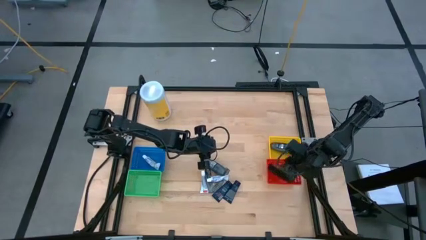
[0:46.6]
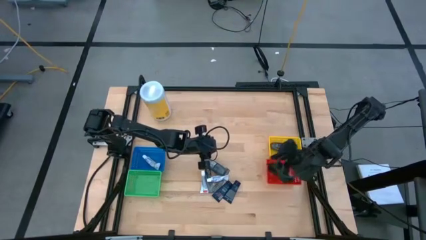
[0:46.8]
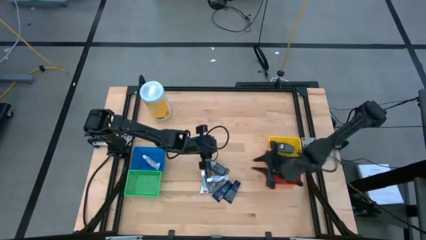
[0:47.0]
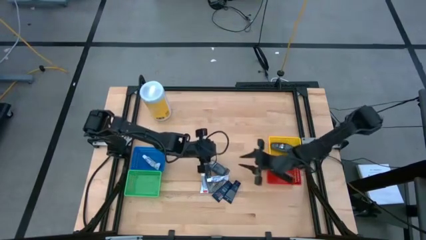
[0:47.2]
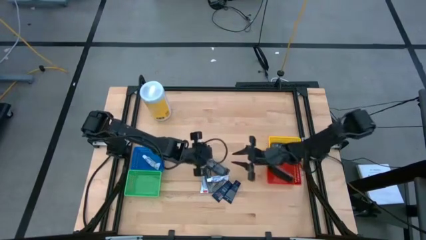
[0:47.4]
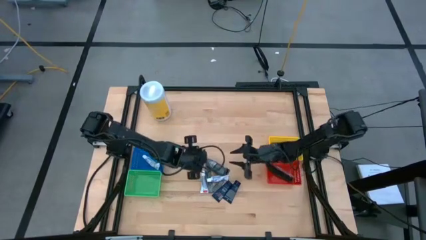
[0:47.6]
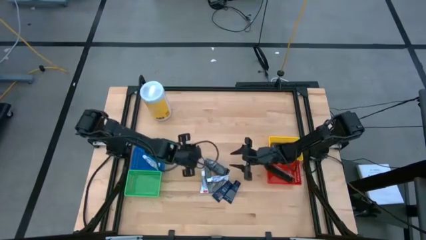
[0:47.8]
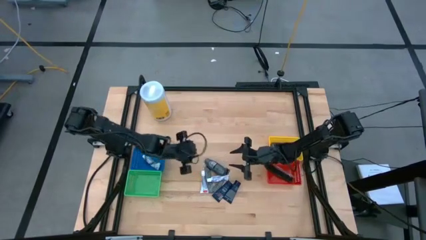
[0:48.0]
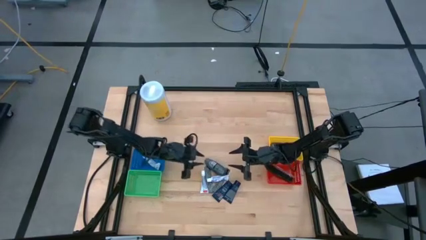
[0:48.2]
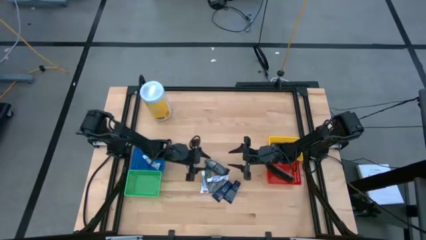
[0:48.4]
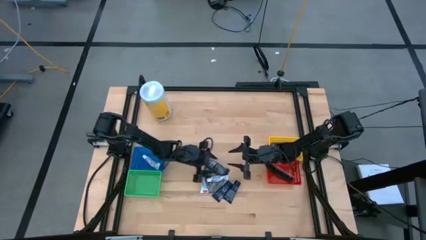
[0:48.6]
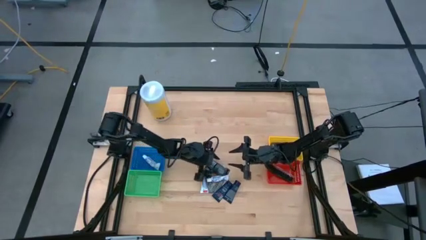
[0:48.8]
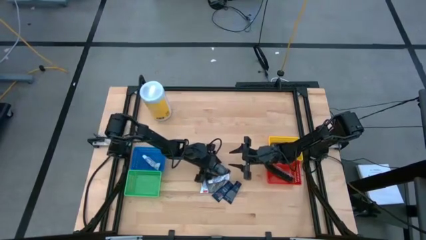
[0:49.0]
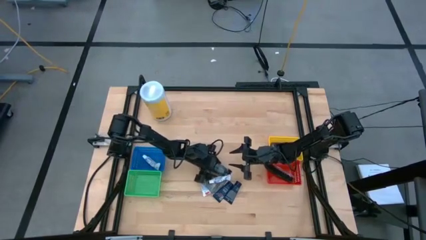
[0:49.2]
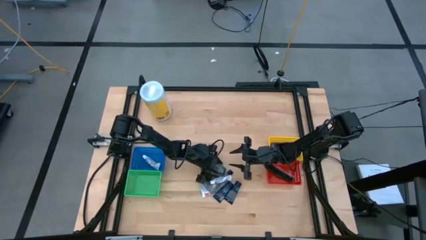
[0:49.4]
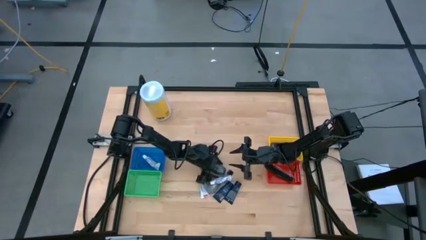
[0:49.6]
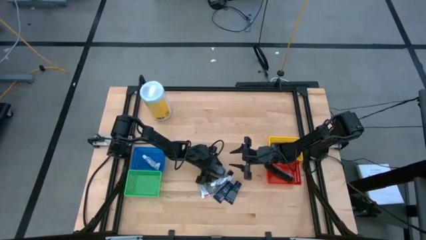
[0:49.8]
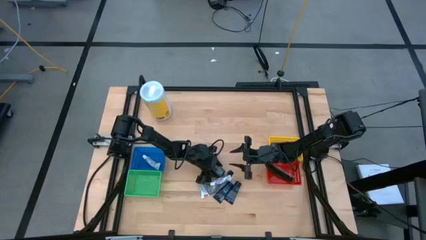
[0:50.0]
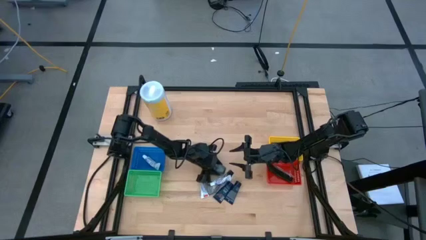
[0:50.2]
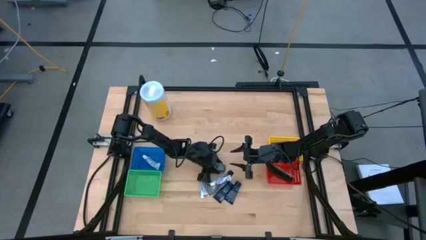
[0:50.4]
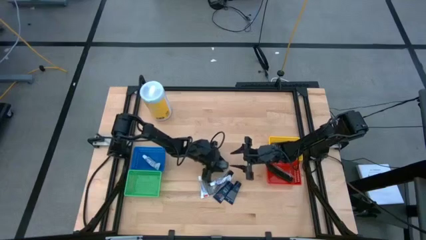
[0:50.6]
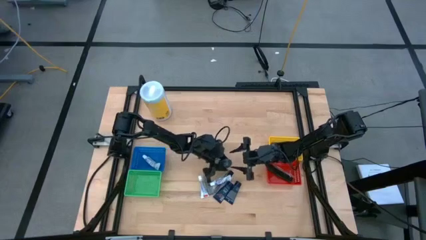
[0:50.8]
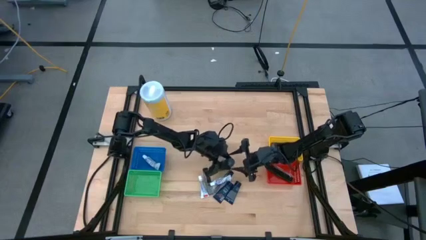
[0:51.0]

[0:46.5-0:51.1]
Task: Pick & Place Travel size toiletries
Put the black deodorant into the yellow basket

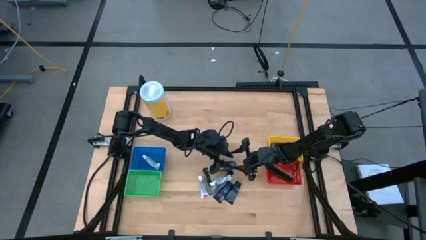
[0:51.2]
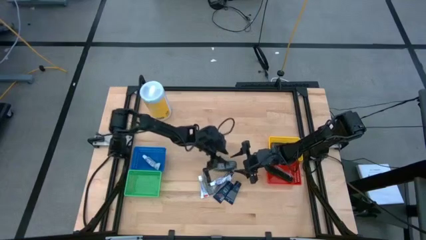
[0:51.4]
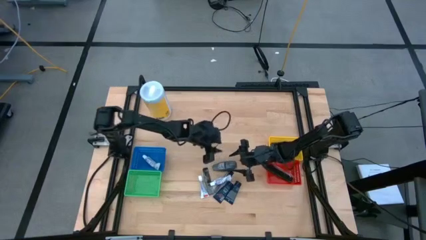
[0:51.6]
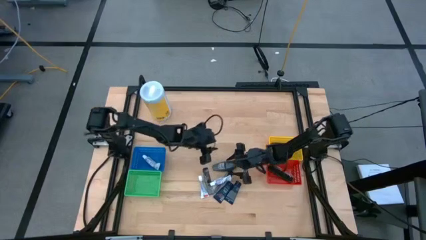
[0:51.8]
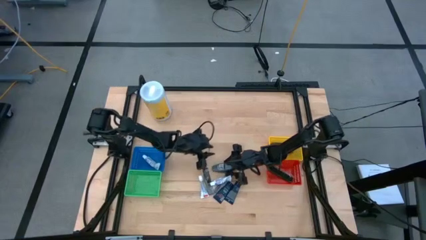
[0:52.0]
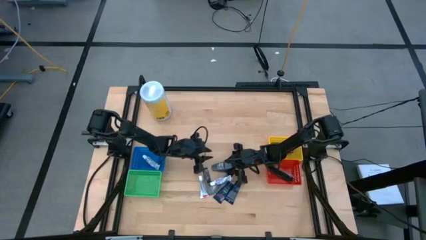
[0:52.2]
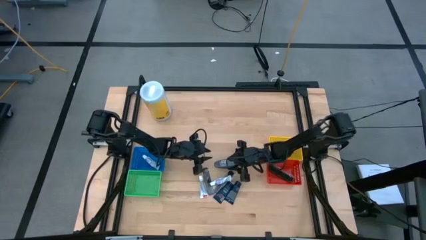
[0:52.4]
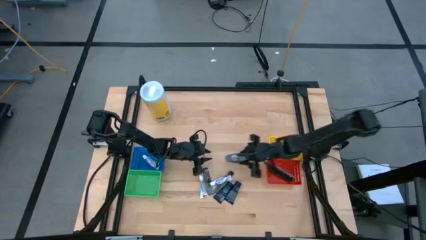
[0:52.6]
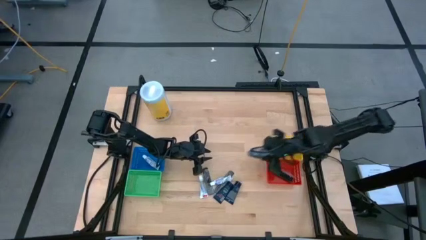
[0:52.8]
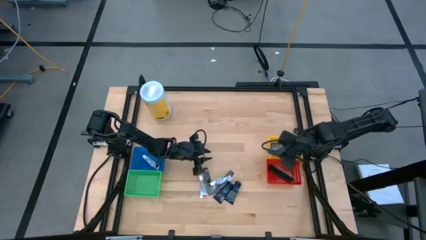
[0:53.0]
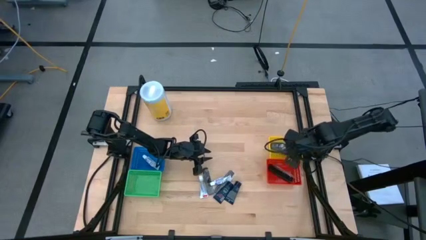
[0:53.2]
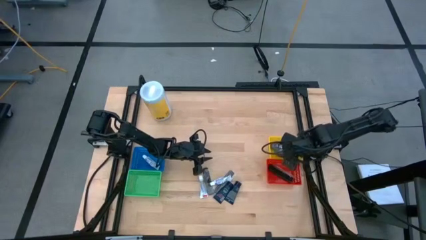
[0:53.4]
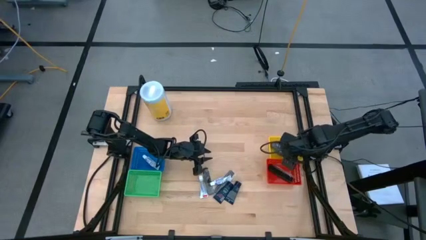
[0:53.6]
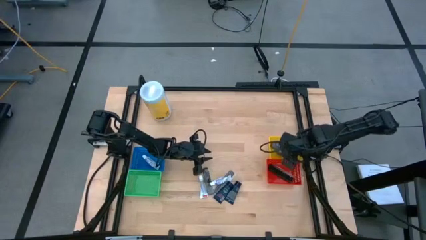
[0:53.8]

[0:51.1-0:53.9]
Put the black deodorant into the yellow basket

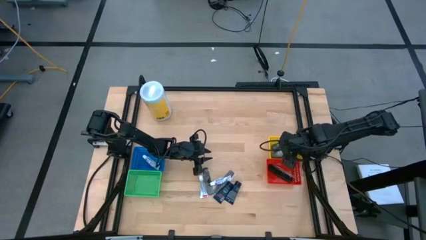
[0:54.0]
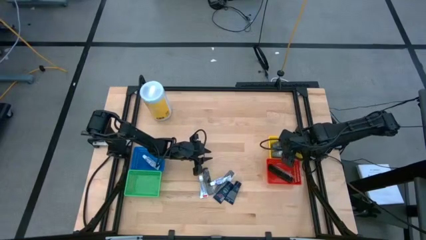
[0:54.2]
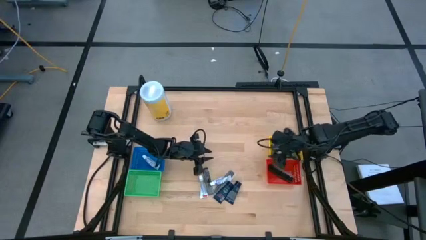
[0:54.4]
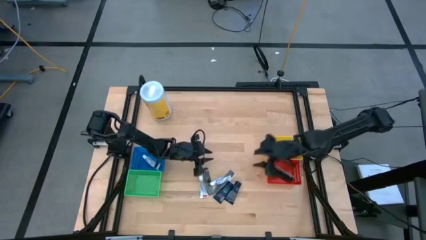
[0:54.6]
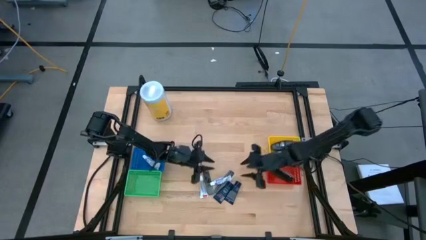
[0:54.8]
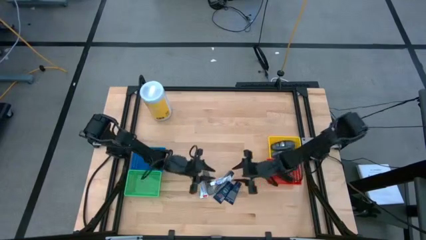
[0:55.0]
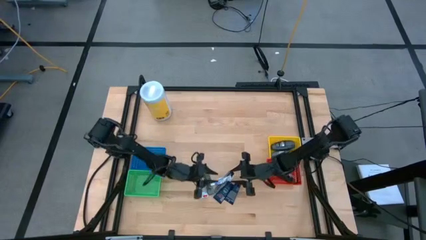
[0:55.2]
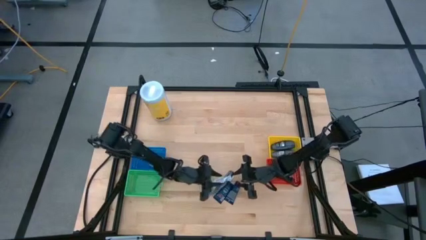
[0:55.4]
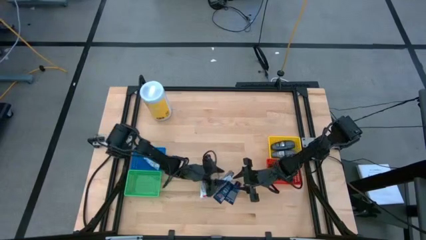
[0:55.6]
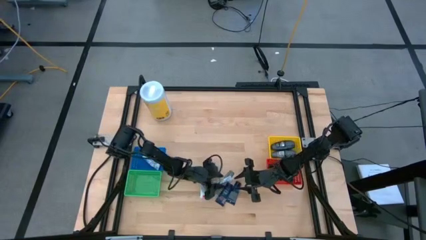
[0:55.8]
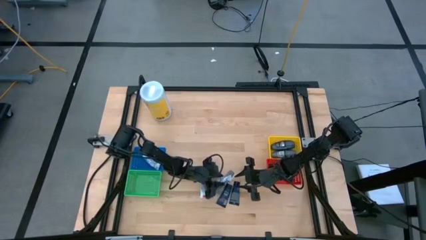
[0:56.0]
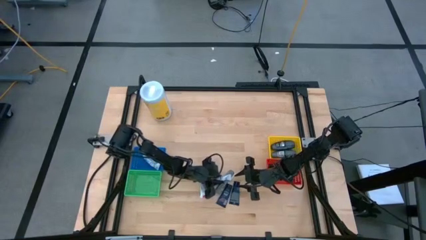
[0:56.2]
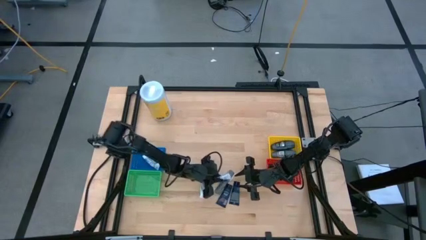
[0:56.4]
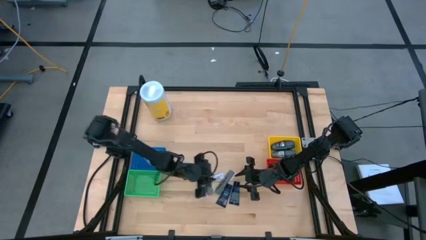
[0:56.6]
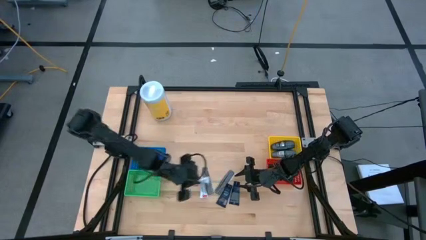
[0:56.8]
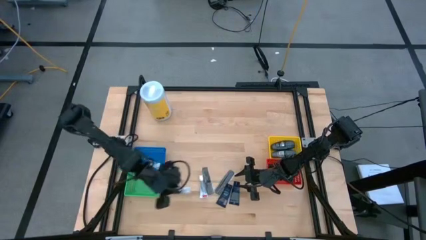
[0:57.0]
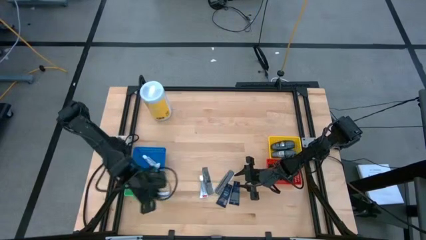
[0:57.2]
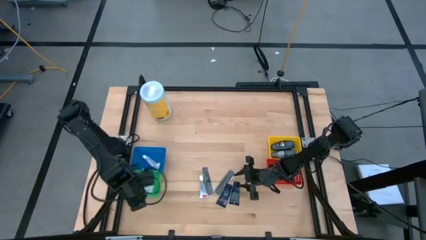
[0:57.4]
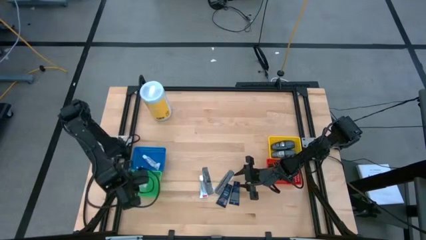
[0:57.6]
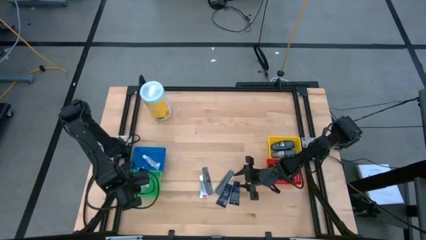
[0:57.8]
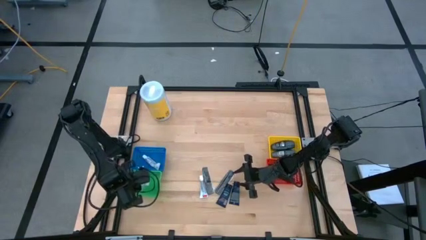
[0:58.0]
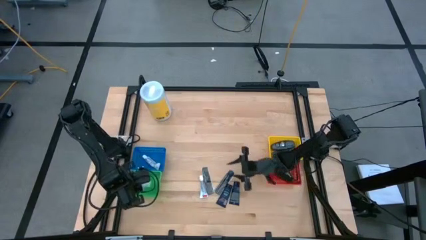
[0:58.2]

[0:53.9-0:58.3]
Put the white toothpaste into the green basket

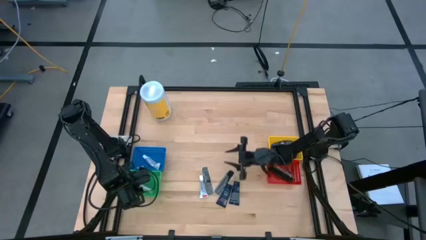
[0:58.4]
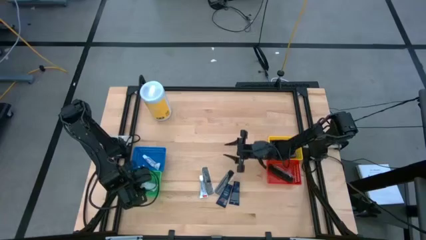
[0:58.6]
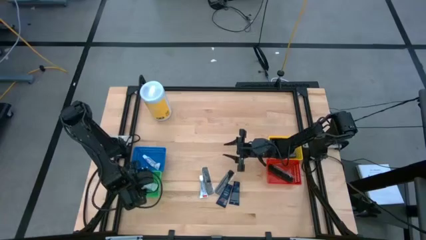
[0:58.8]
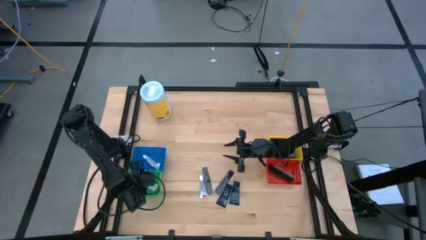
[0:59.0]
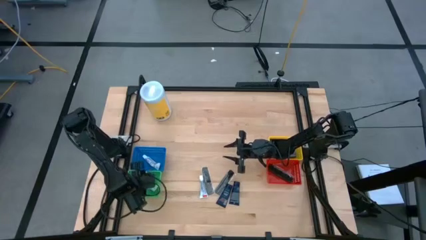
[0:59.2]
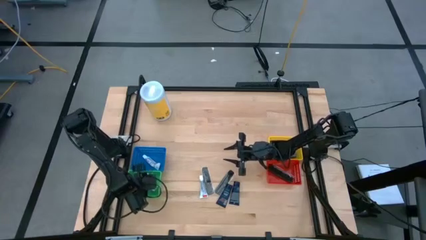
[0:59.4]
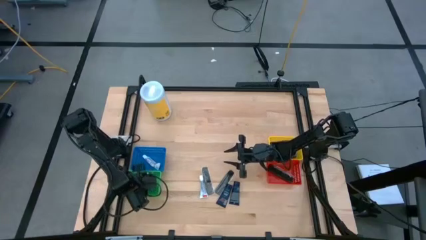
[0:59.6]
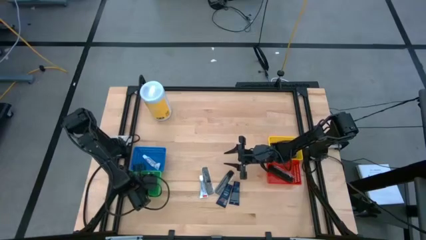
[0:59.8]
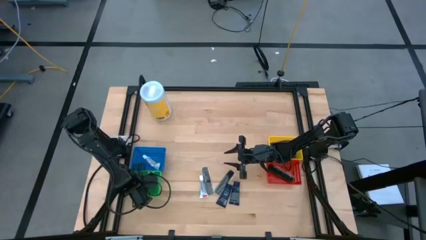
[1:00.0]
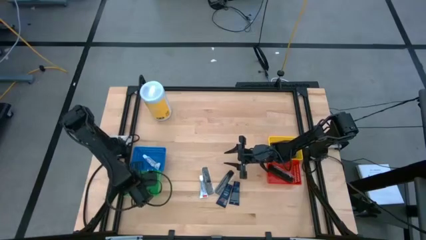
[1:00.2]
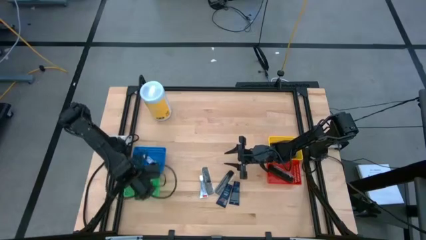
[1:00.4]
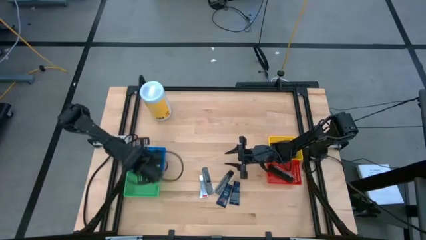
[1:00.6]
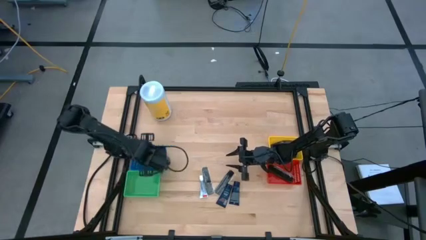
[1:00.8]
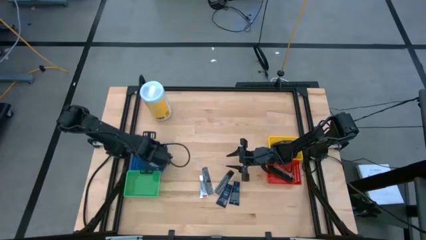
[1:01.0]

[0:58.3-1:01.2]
Put the white toothpaste into the blue basket

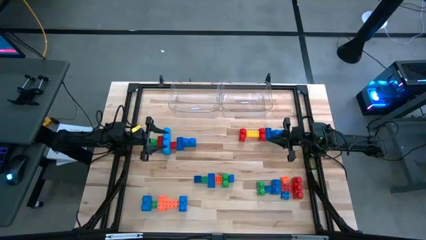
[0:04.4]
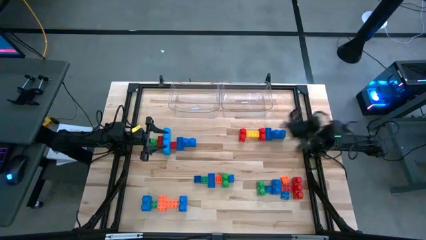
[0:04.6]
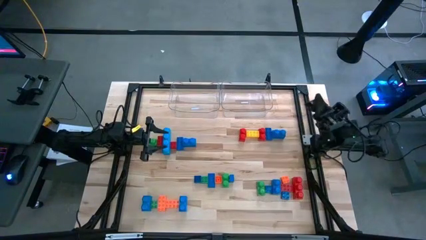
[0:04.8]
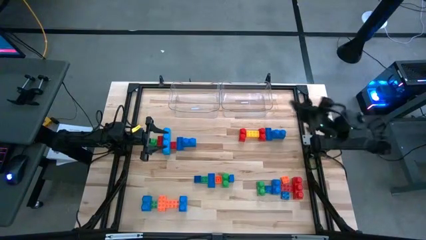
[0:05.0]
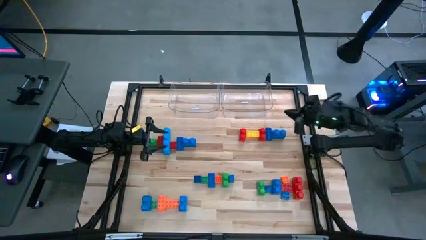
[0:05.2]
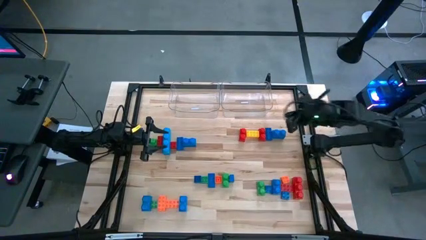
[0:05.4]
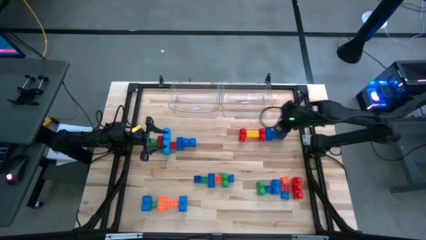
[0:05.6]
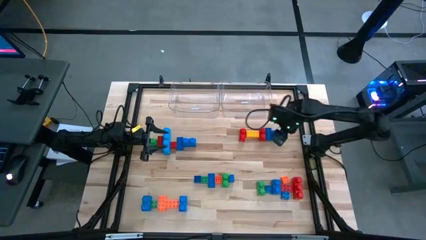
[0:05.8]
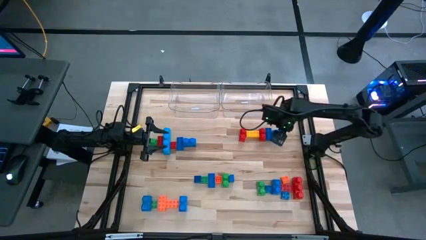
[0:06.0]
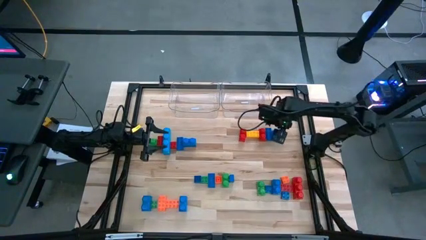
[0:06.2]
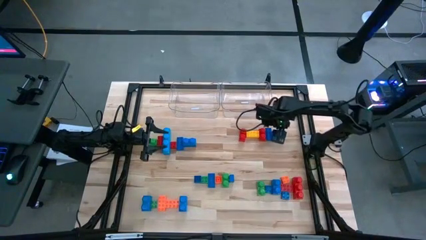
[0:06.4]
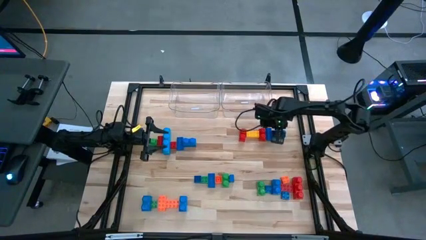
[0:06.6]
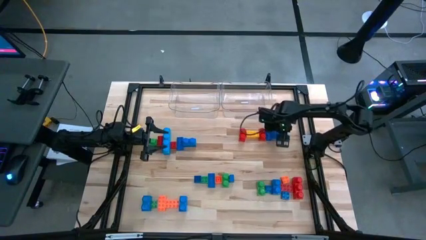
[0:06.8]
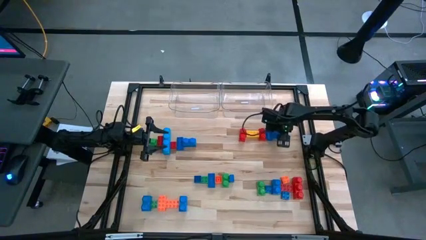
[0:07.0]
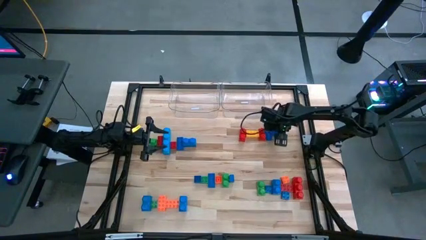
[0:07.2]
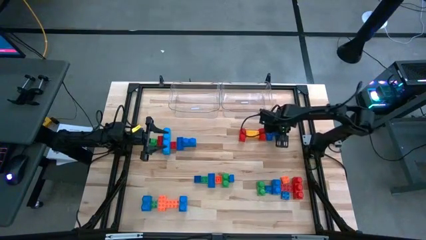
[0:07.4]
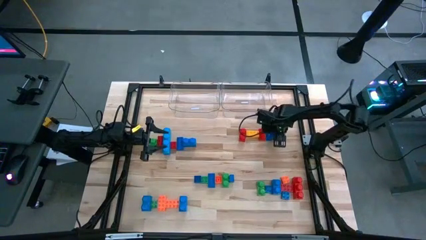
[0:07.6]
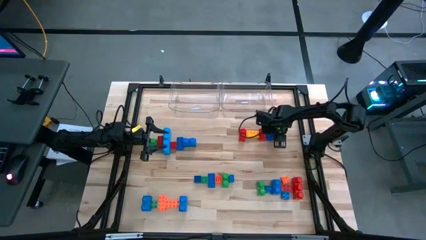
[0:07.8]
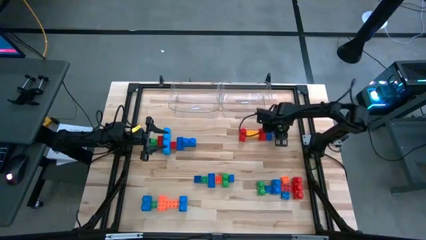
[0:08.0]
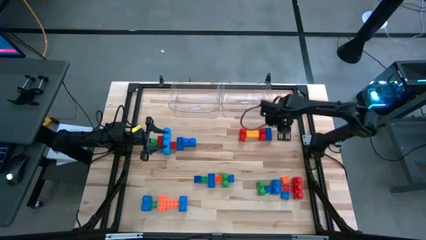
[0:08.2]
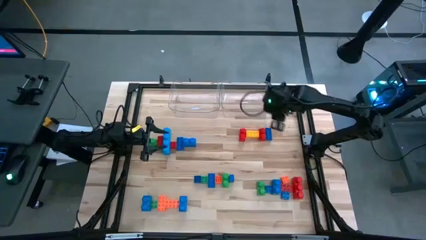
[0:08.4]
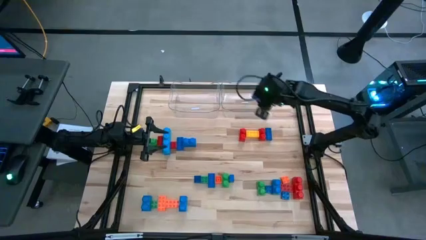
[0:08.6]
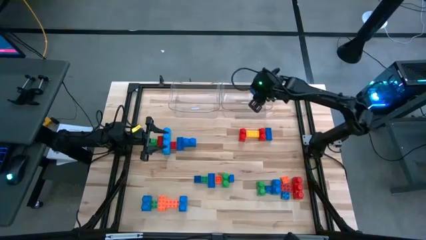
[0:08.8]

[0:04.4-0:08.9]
Task: Sort blocks by size
Put the blue lego piece into the right transparent bin
